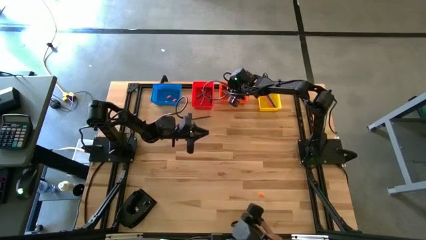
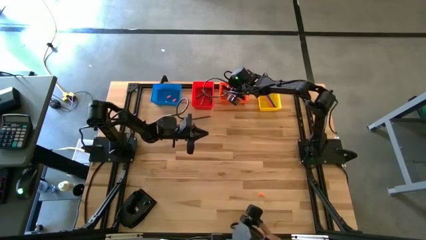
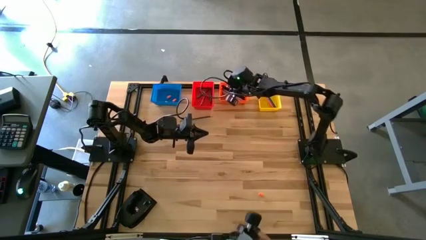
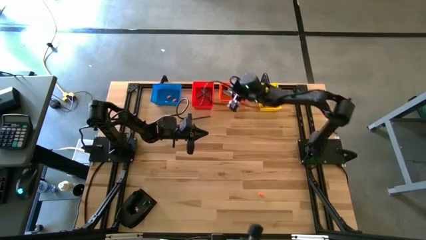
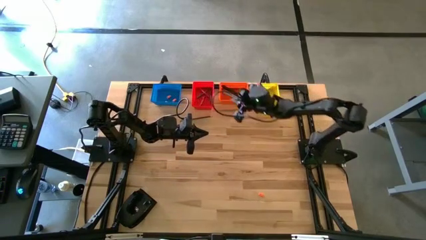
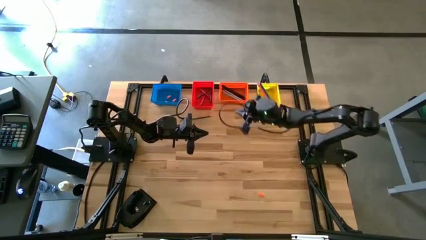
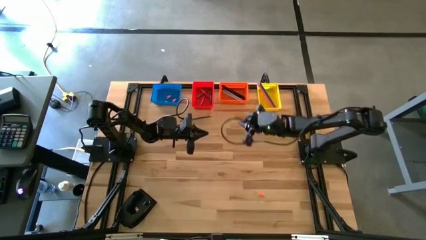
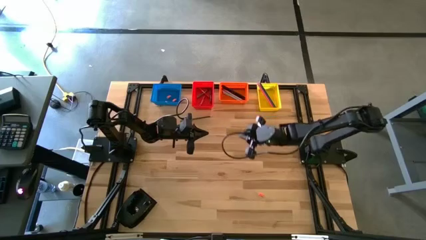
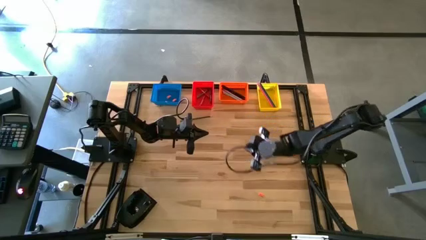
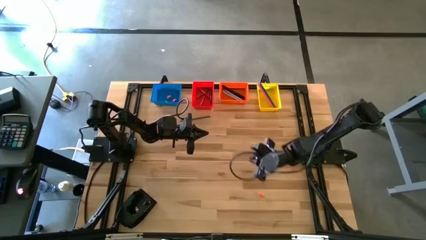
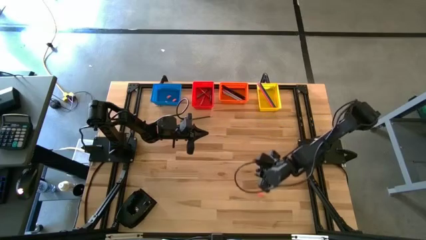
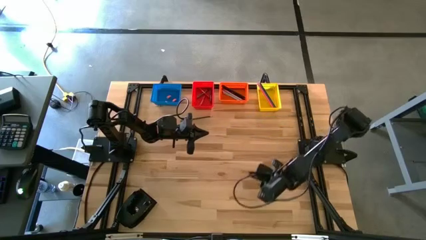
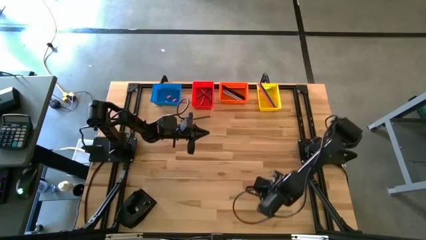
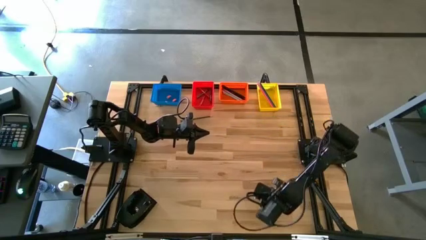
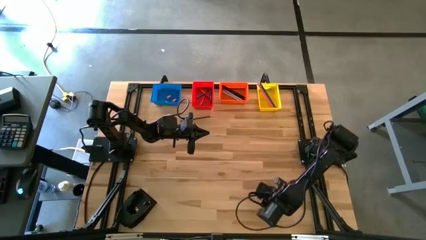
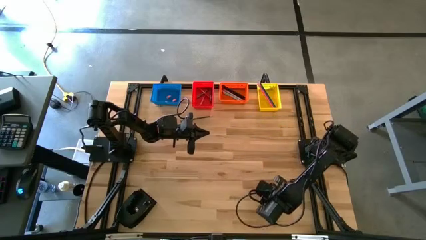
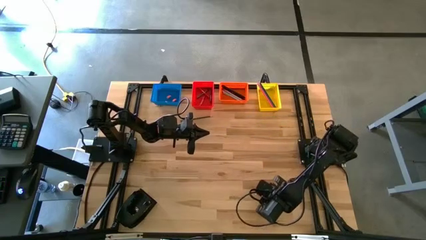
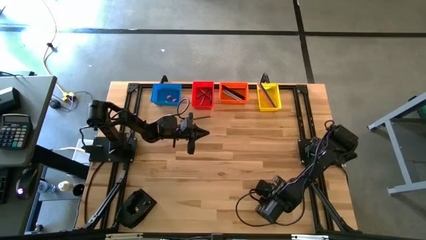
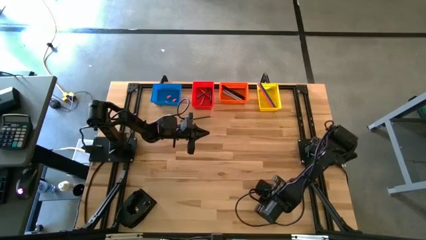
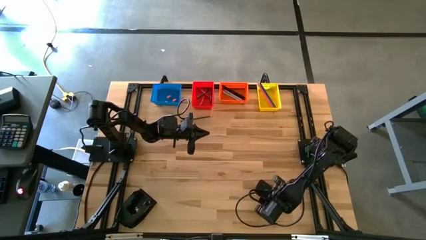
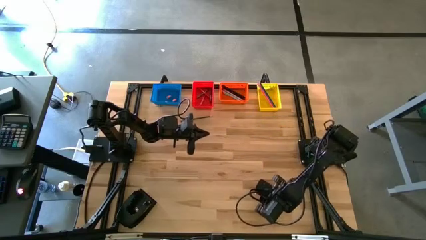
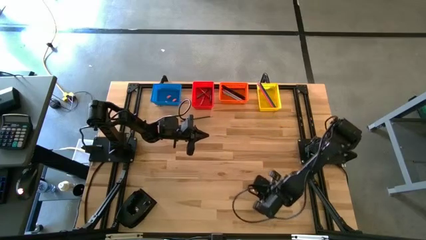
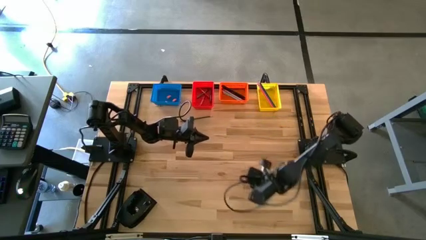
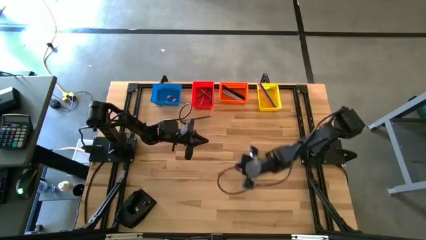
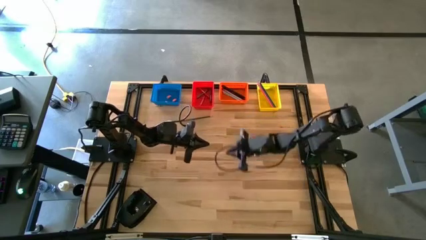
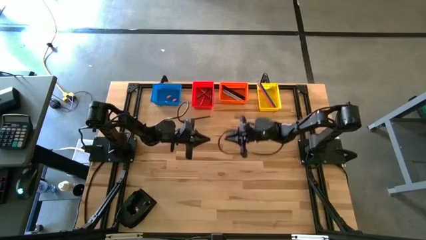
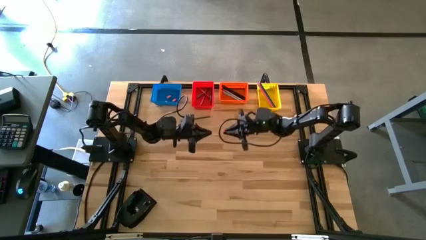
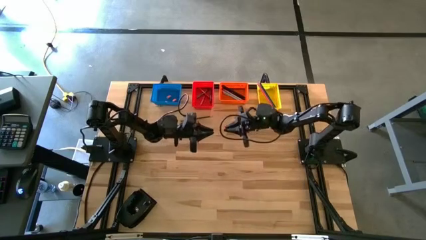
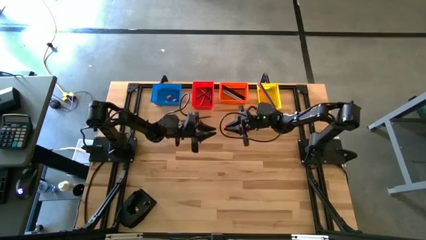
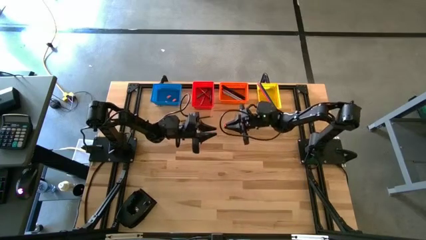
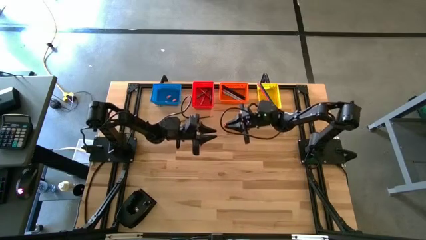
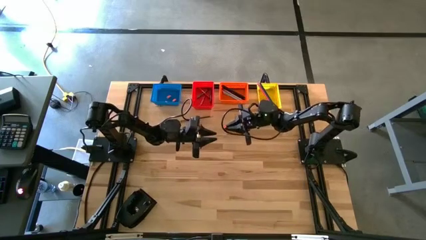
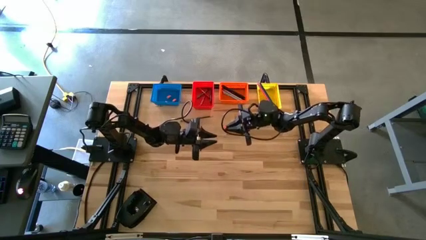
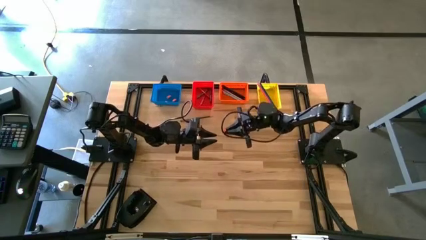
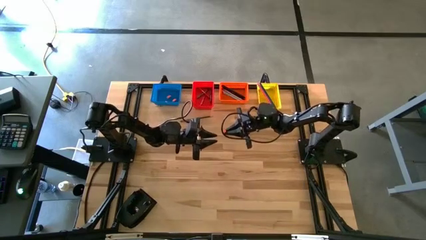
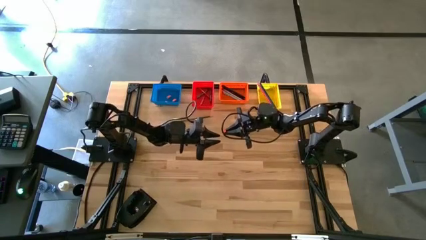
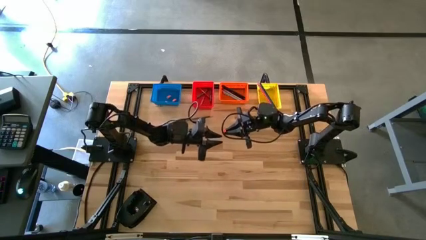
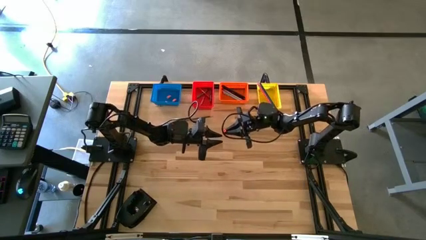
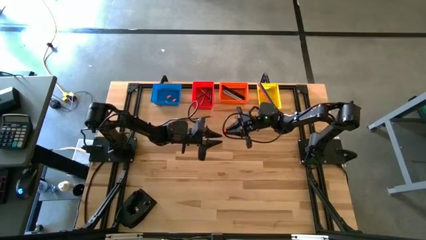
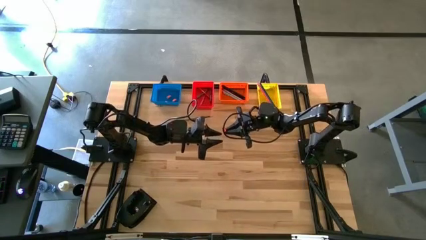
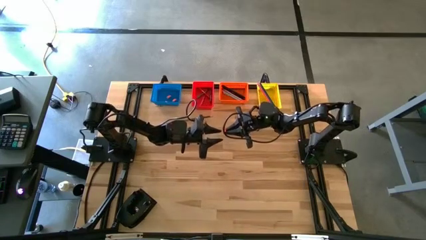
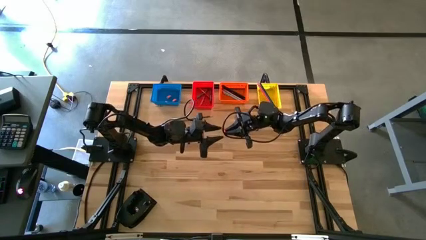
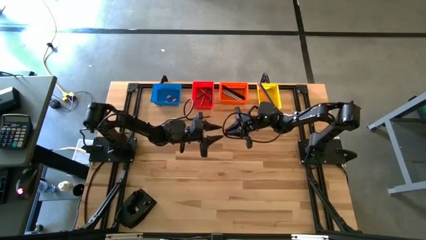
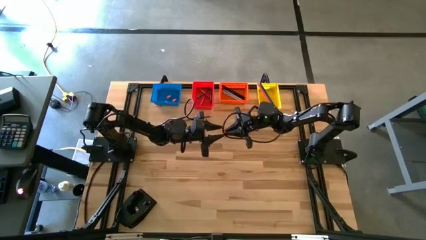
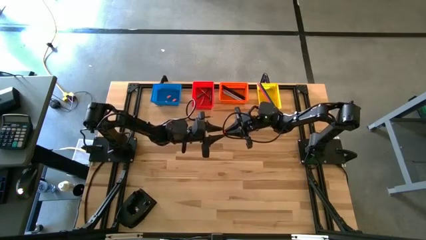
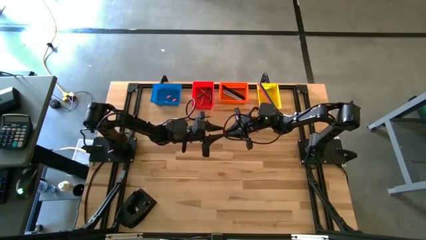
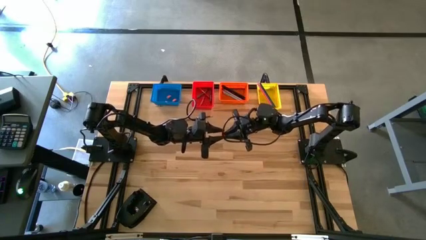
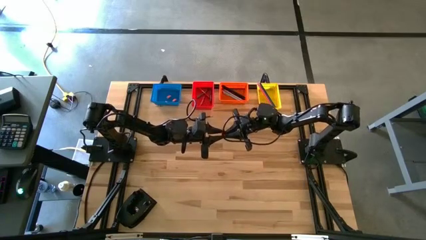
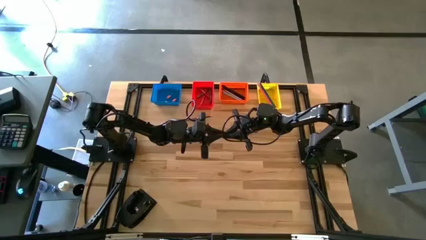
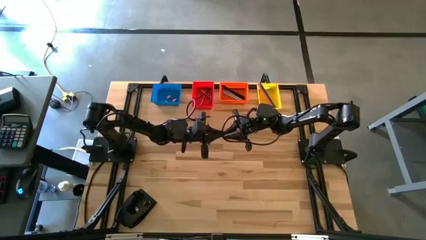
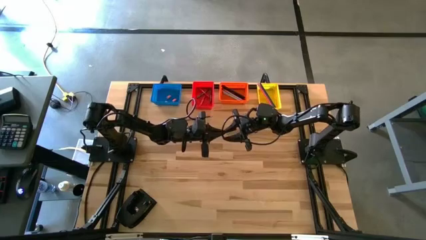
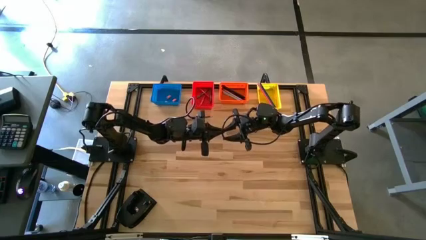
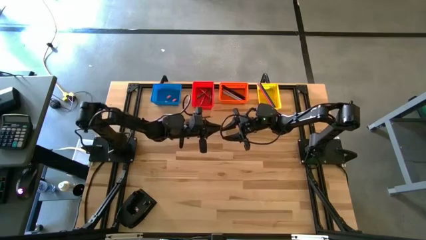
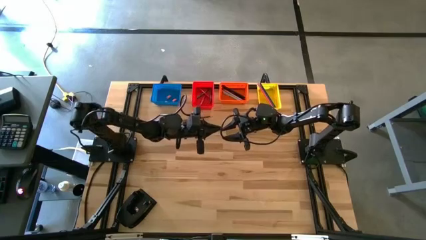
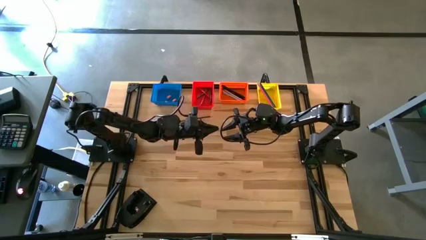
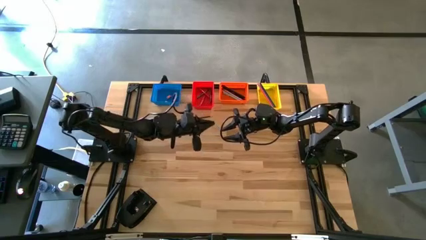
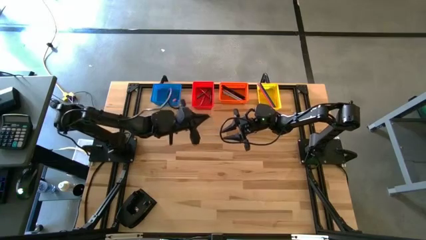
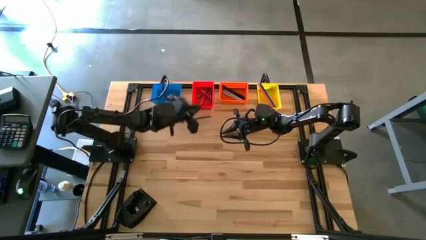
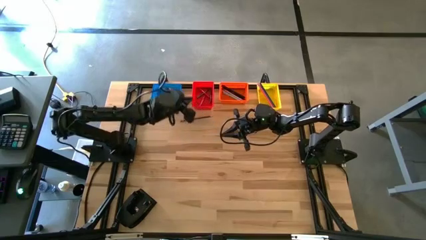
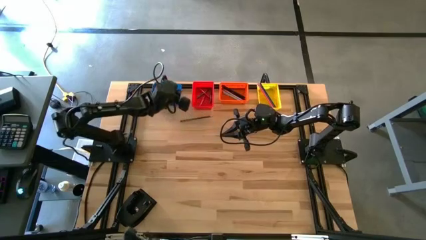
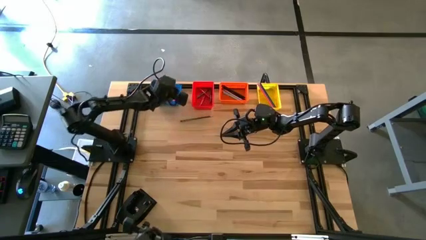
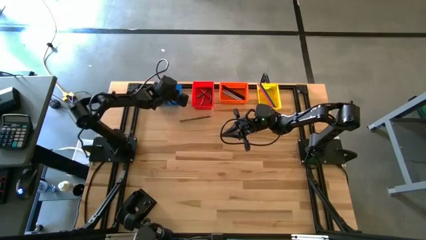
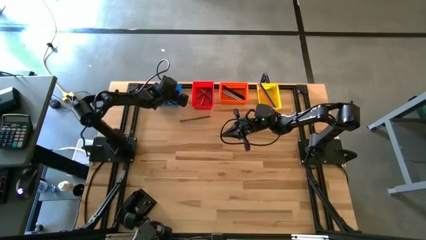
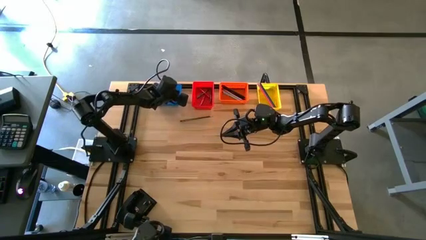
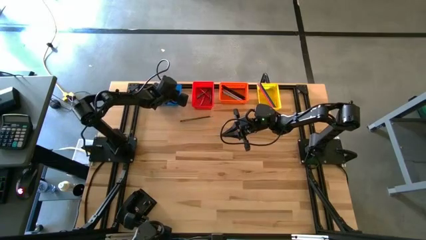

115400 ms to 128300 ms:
Task: Sort crayons/erasers/pens/pencils in bins
Put the orange eraser into the blue bin
